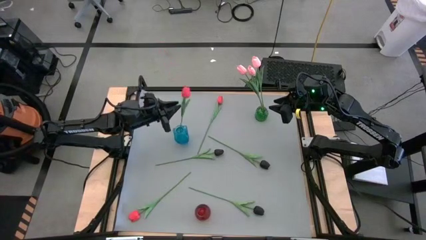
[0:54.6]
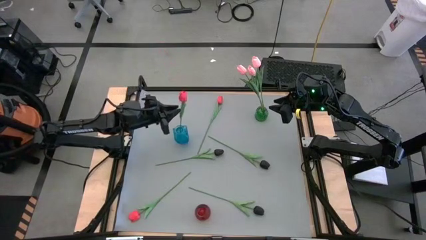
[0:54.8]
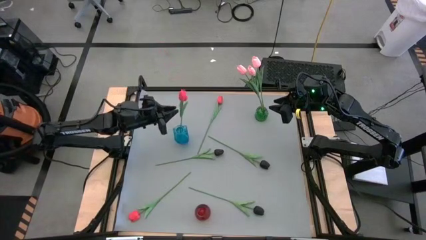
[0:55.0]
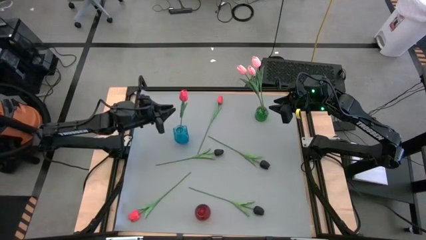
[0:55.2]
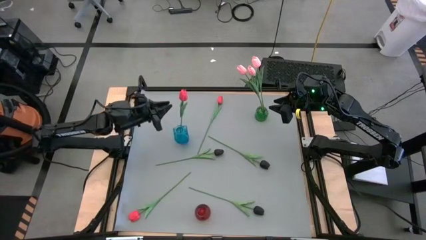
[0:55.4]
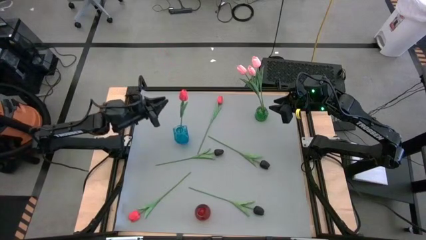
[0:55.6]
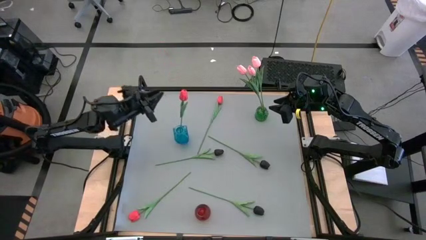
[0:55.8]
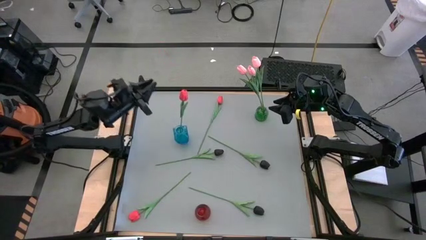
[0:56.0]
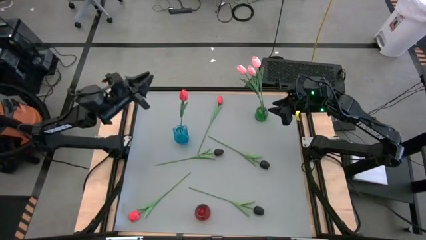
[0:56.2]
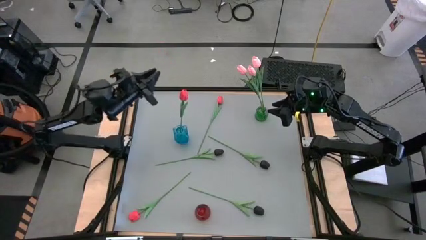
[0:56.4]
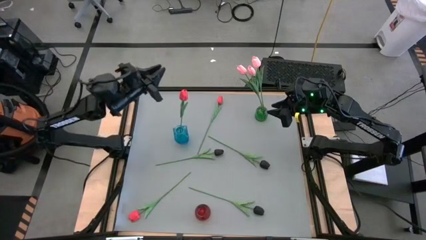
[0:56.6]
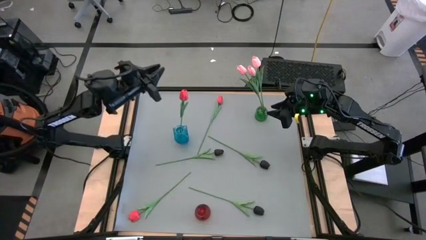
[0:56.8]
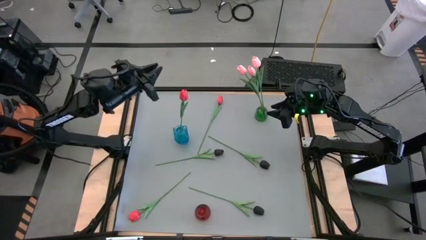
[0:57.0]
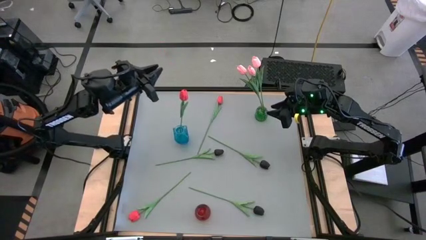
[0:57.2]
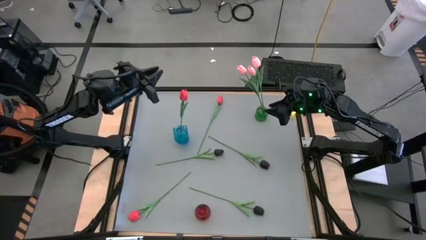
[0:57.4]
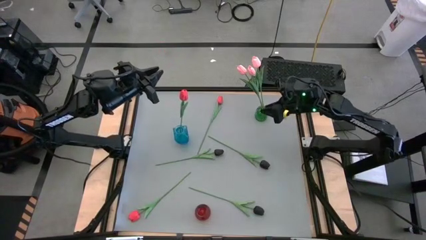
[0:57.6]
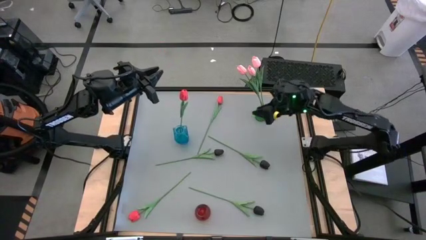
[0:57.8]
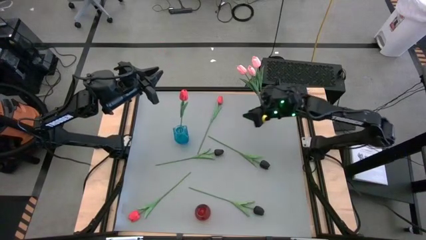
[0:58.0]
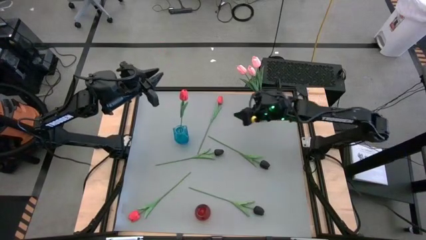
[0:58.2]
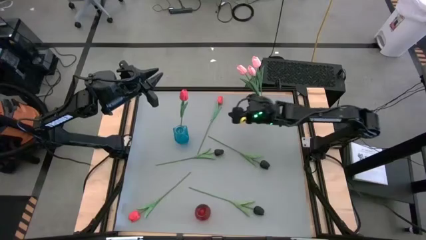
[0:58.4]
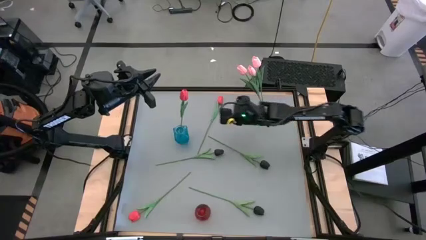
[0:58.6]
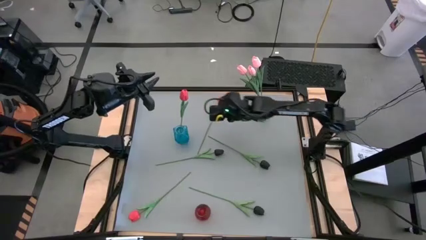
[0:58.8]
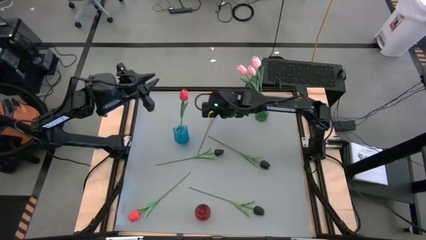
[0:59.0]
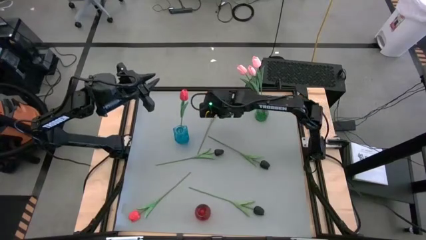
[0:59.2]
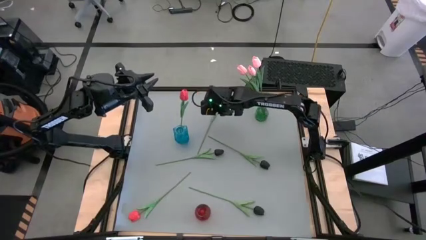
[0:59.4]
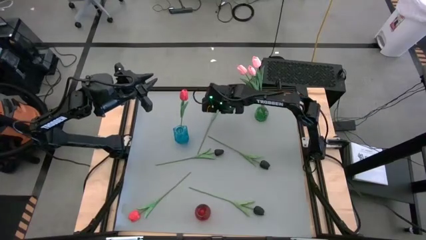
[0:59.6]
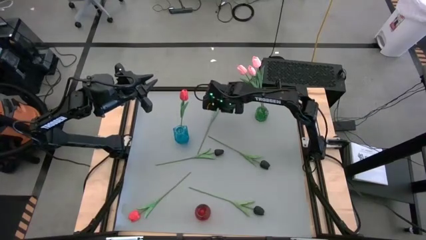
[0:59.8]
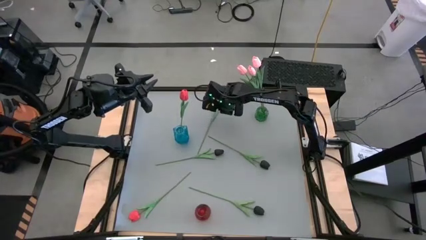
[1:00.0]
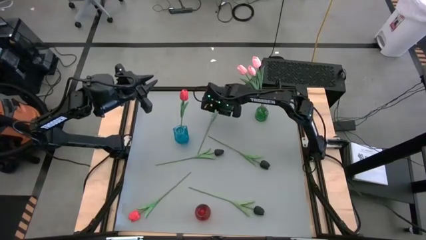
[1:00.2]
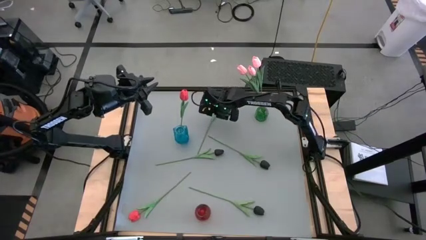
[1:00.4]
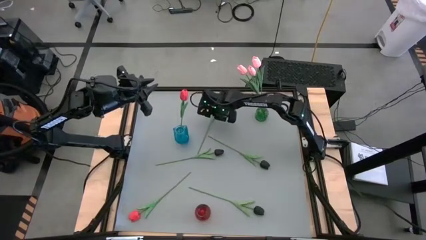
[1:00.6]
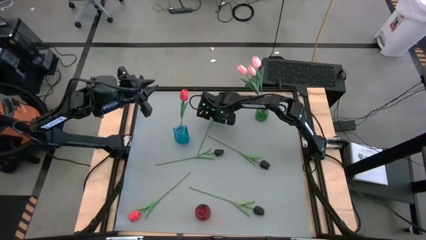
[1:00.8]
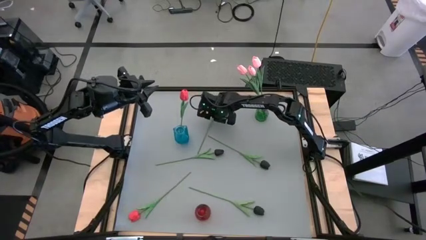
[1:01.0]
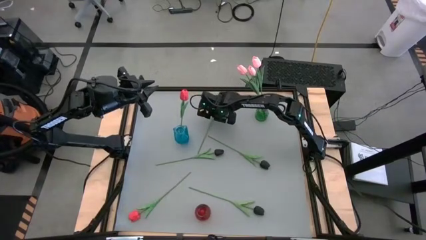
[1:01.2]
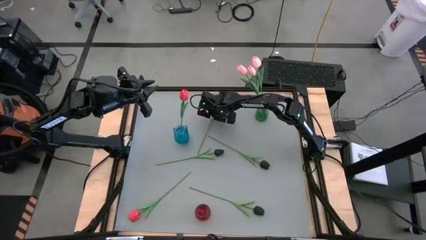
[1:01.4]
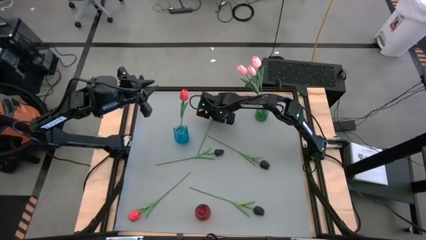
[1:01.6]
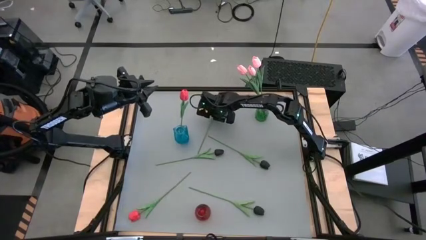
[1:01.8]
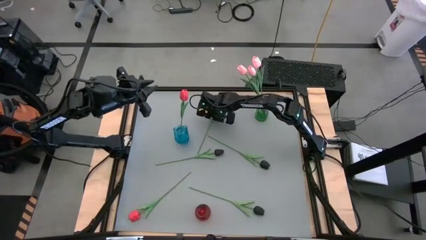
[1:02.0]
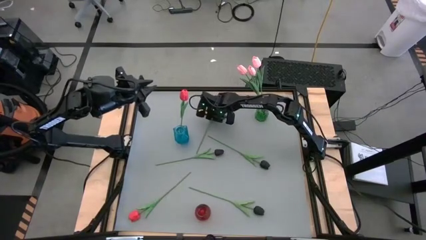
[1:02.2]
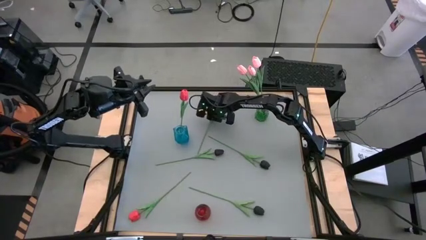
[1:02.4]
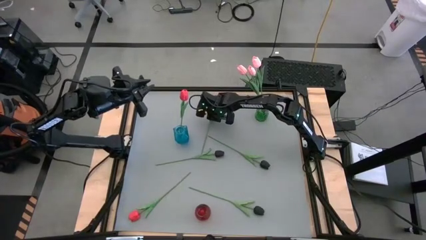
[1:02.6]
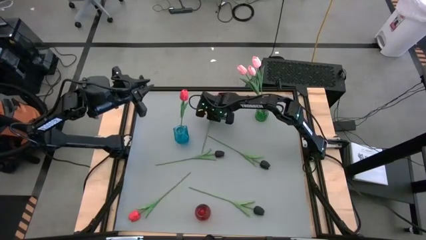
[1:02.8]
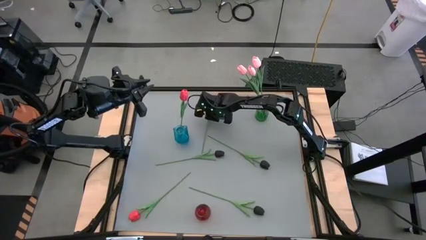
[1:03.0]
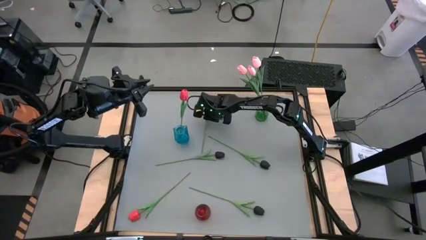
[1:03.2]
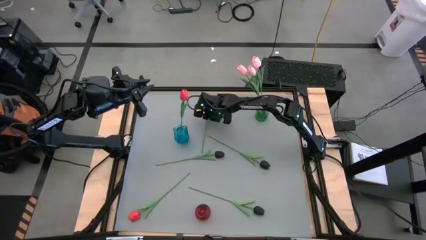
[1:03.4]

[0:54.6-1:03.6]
Task: Sort flowers into vase by color
Put the top red flower into the blue vase

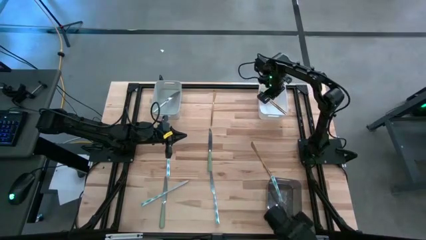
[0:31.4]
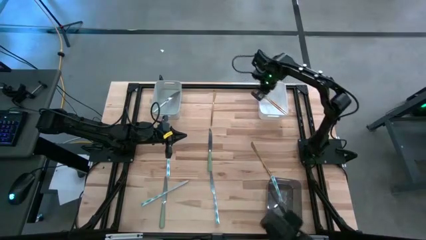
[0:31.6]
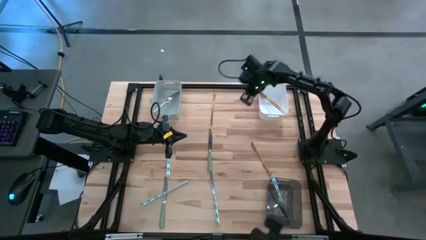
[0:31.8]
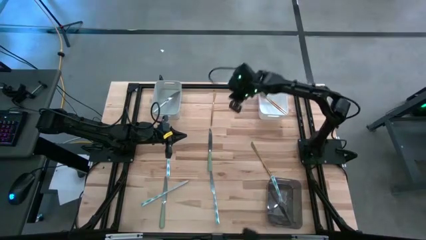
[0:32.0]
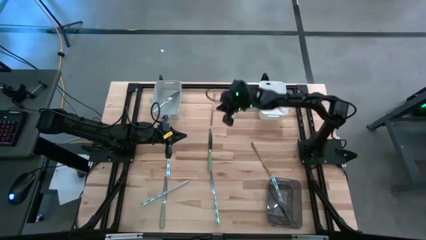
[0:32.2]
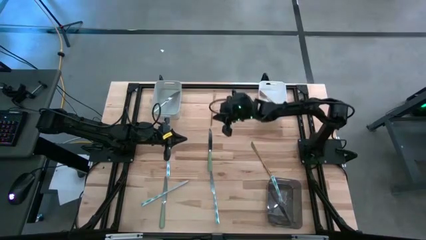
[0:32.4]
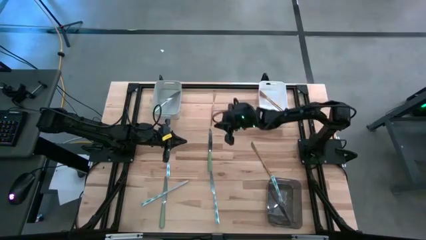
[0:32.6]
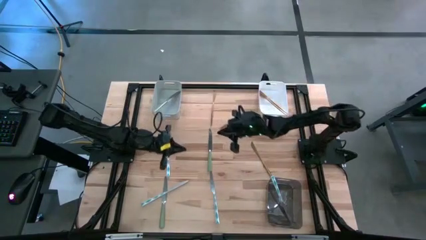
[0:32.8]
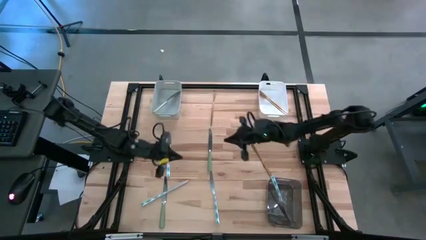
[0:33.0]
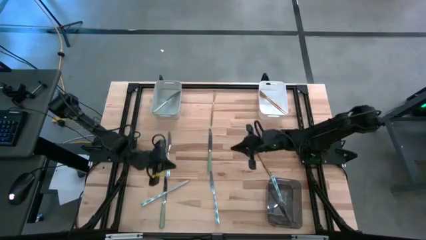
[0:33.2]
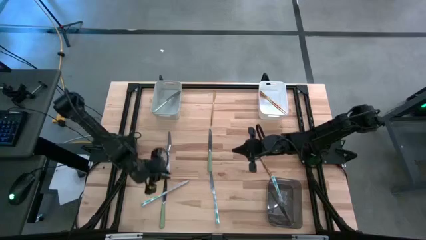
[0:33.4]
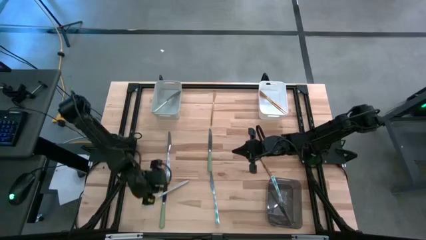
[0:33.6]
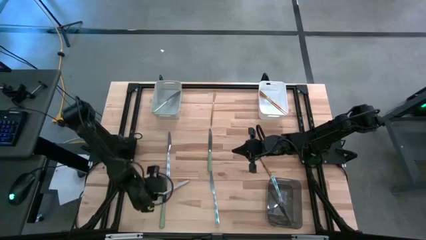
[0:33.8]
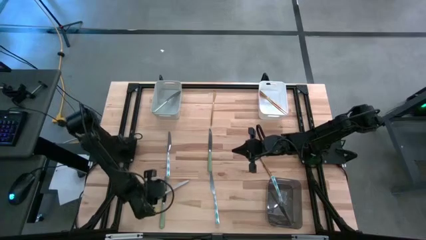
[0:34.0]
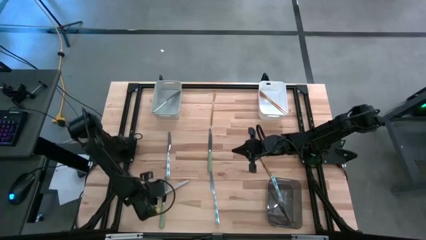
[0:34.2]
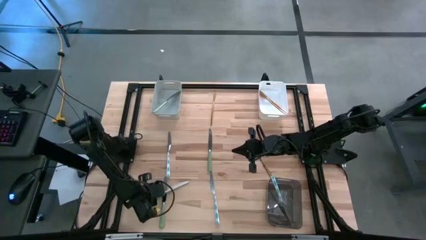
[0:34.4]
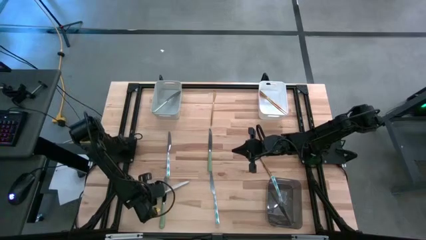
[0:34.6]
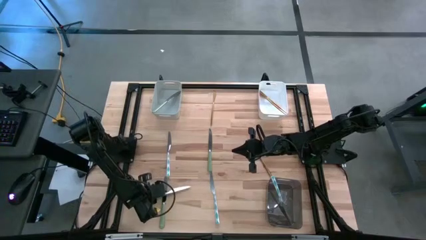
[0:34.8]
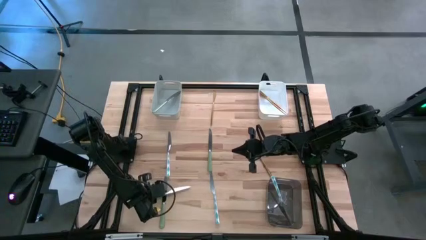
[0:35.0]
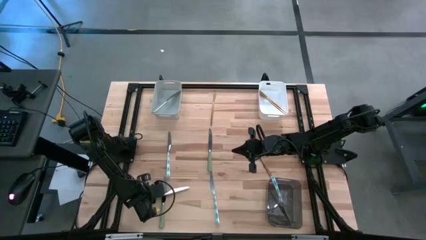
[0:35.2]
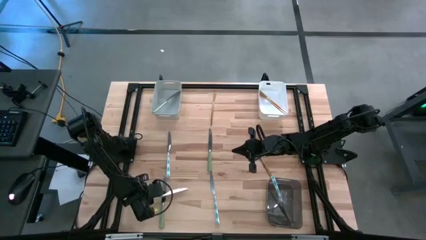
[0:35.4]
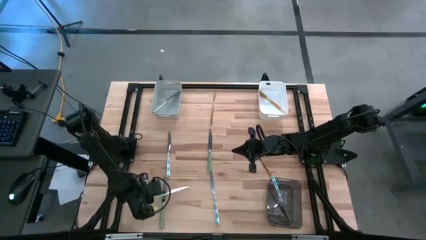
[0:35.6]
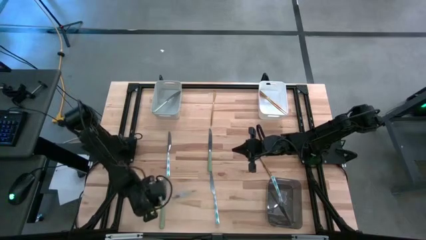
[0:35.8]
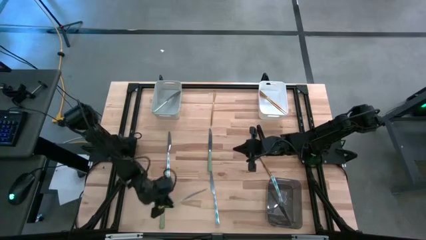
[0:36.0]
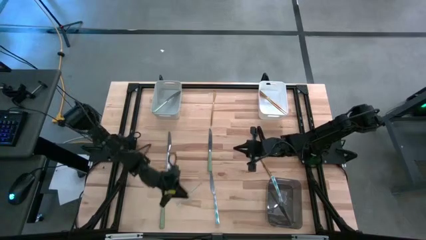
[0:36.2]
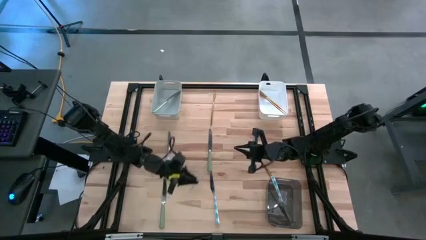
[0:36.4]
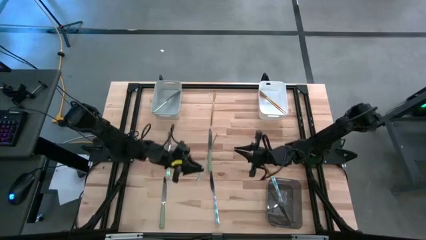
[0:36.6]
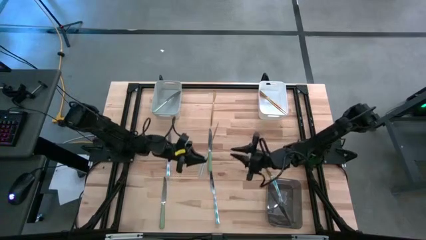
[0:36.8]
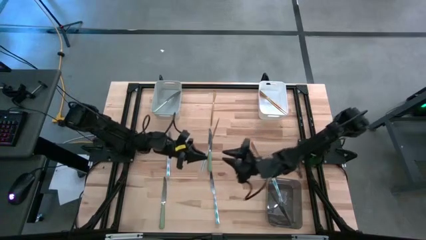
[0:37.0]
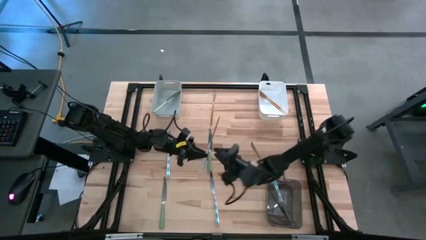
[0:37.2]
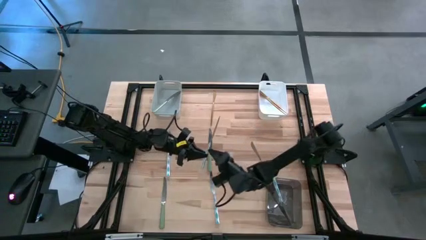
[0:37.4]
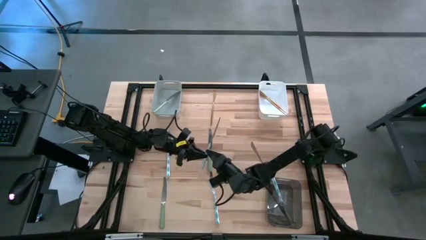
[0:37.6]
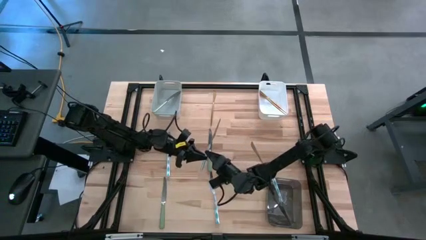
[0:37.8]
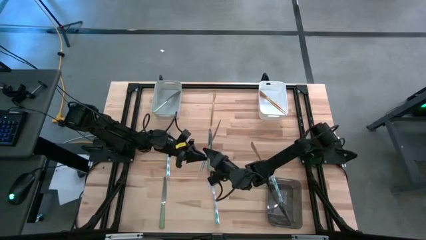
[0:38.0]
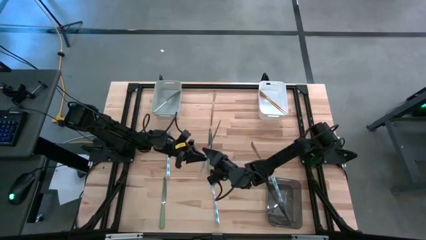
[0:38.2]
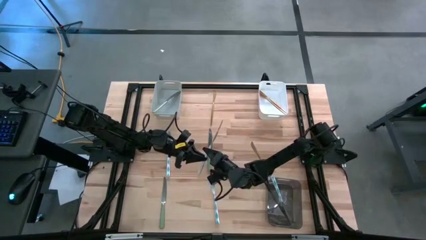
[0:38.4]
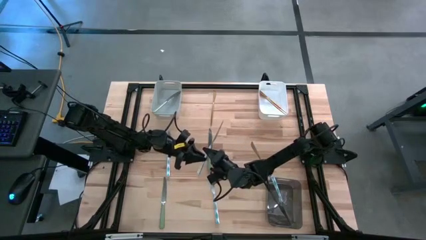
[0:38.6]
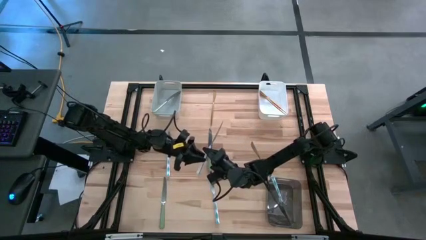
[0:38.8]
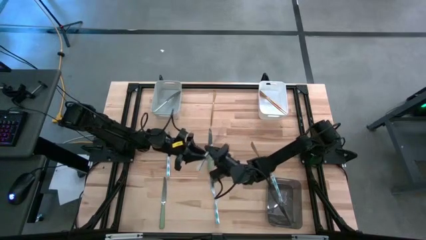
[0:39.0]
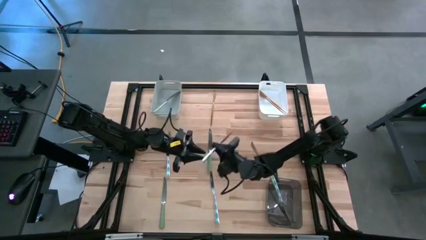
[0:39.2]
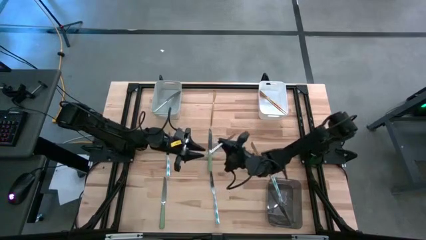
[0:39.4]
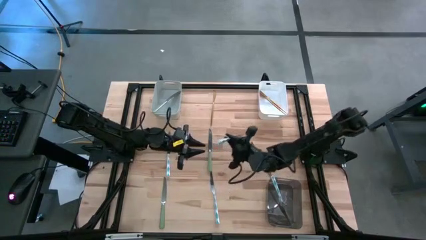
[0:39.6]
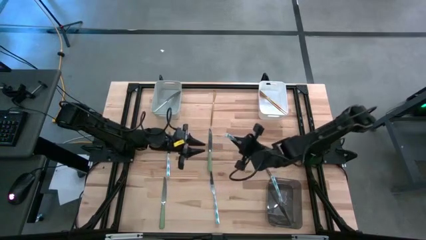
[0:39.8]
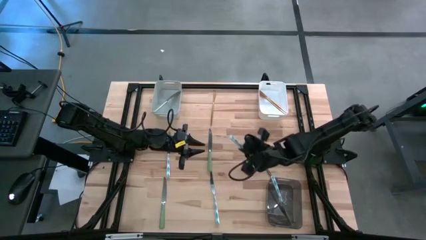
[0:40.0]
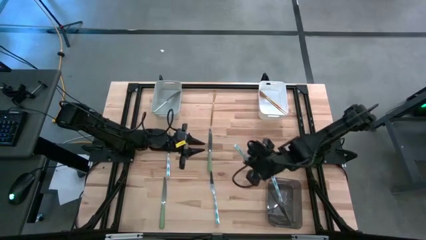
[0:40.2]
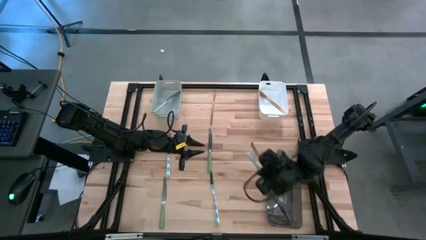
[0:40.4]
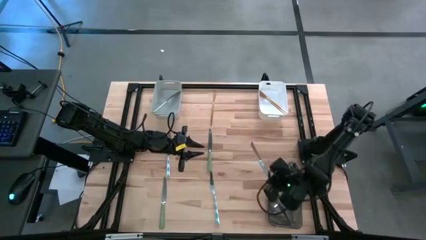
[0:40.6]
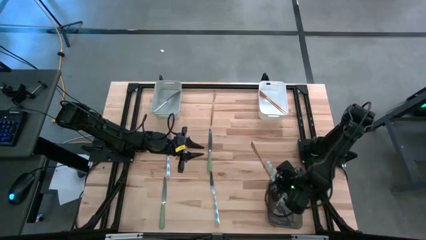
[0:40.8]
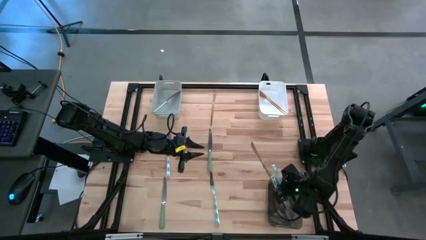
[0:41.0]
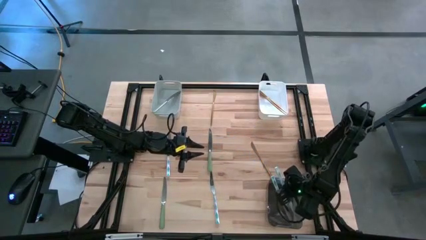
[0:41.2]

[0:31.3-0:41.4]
Task: Sort silverware by color (type)
Put the bottom left blue knife into the black bin
